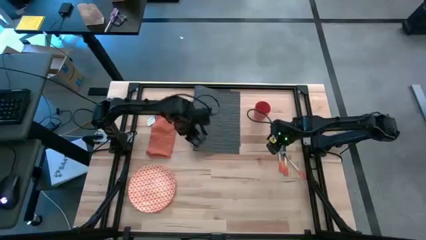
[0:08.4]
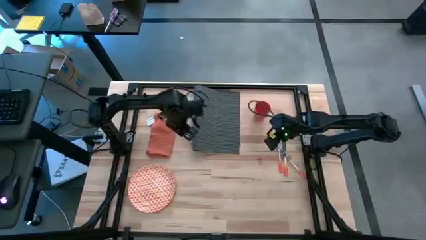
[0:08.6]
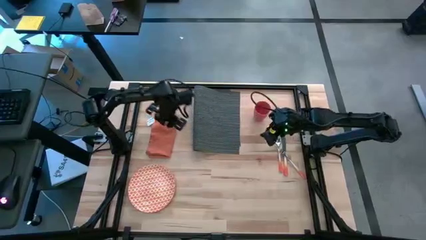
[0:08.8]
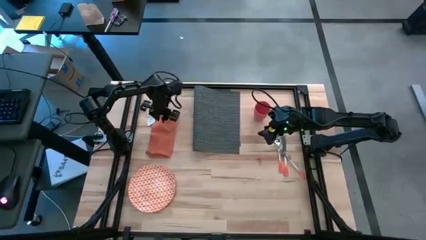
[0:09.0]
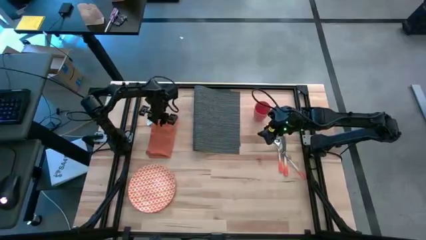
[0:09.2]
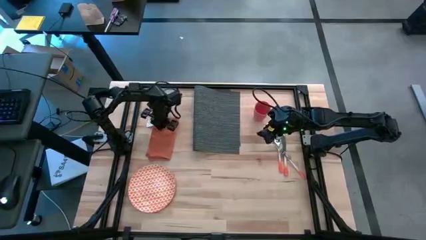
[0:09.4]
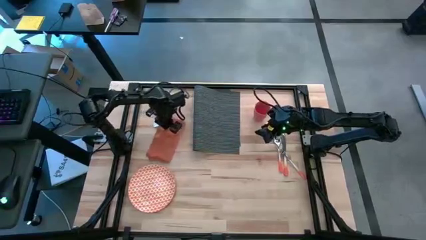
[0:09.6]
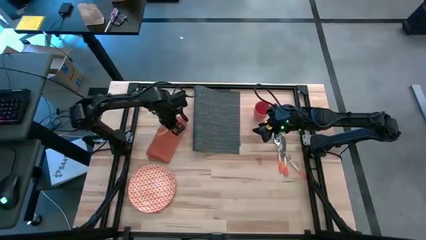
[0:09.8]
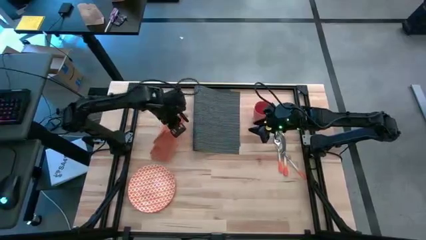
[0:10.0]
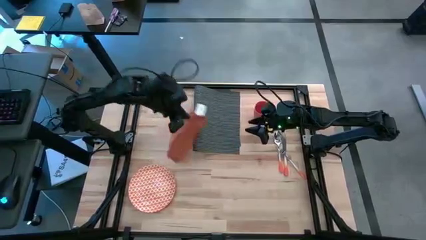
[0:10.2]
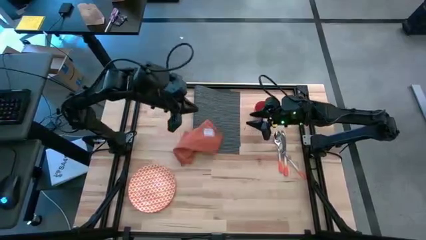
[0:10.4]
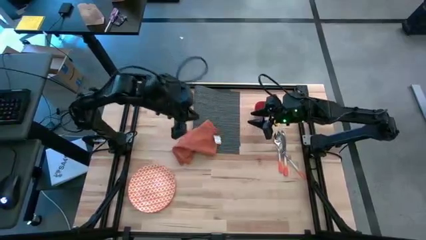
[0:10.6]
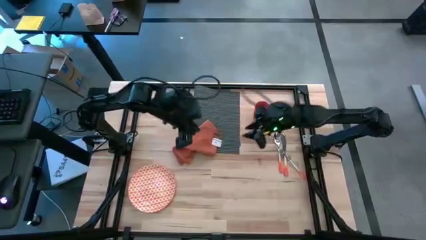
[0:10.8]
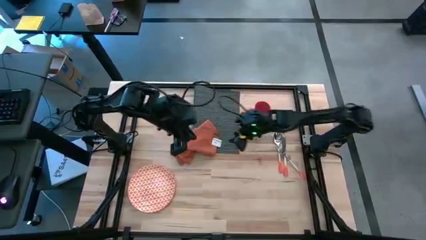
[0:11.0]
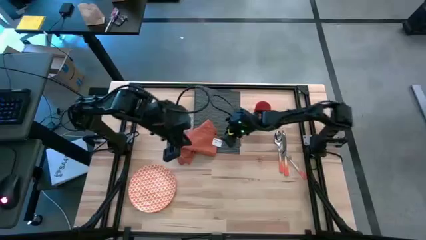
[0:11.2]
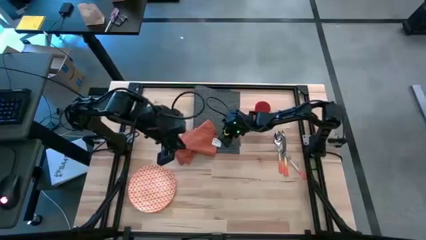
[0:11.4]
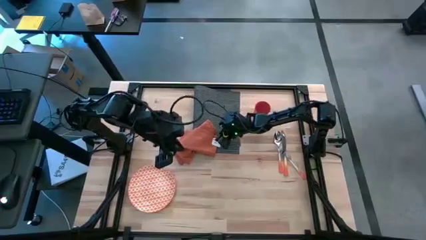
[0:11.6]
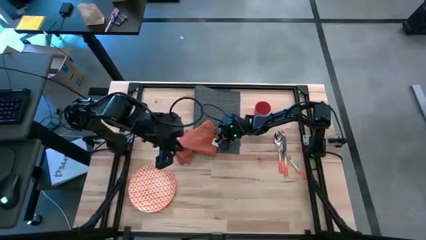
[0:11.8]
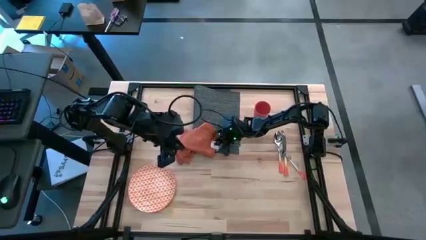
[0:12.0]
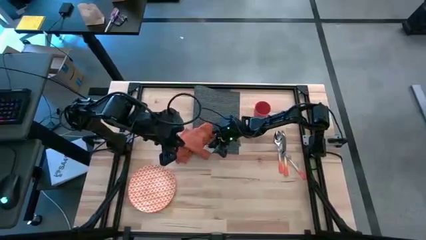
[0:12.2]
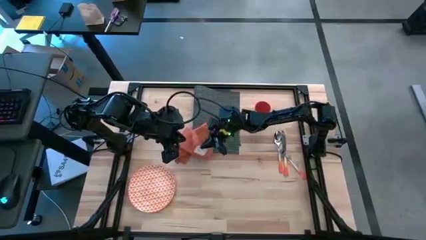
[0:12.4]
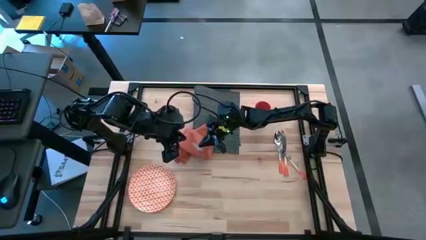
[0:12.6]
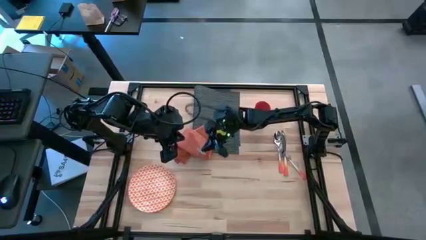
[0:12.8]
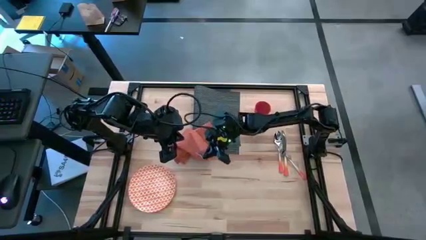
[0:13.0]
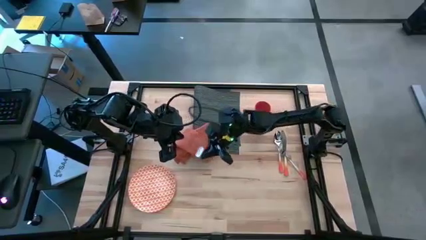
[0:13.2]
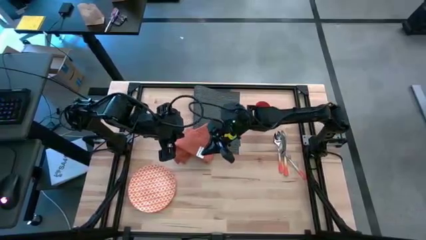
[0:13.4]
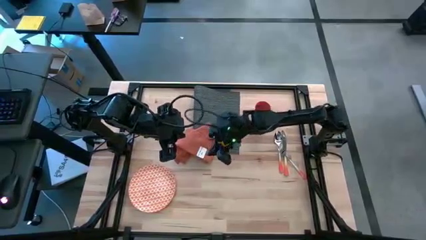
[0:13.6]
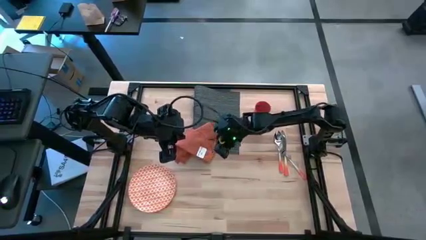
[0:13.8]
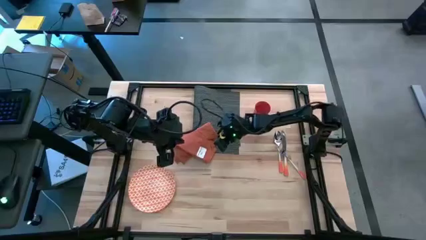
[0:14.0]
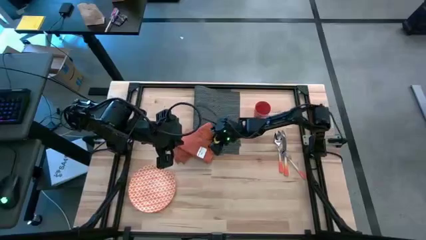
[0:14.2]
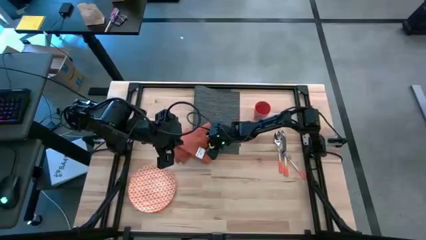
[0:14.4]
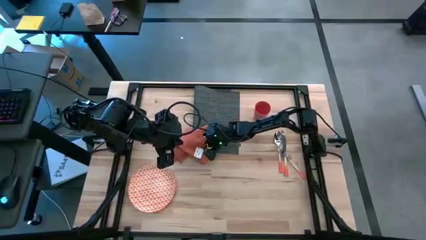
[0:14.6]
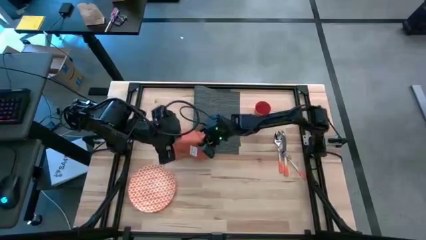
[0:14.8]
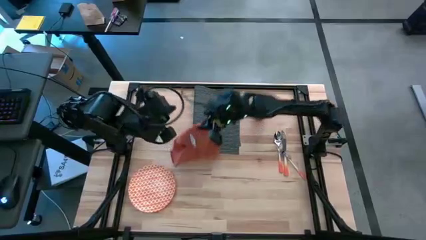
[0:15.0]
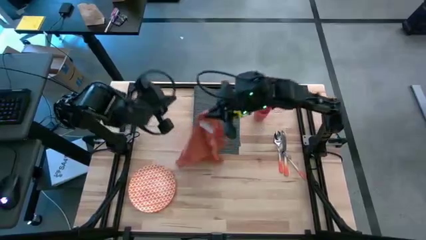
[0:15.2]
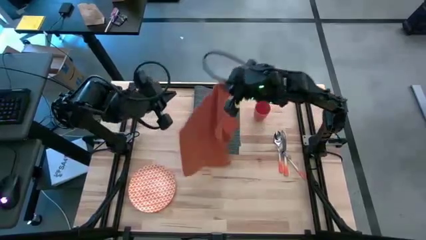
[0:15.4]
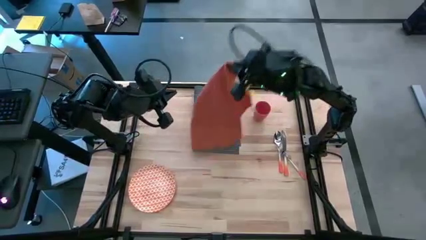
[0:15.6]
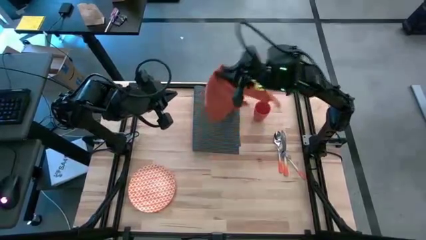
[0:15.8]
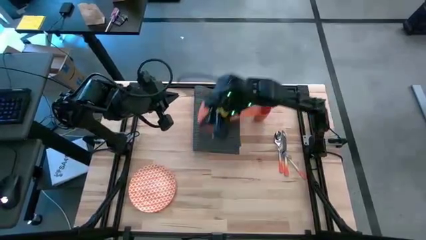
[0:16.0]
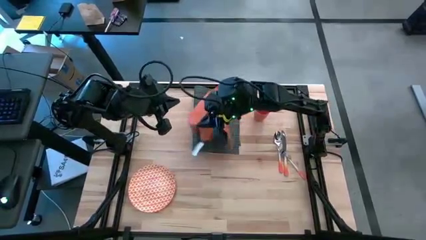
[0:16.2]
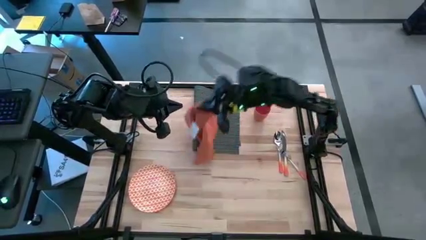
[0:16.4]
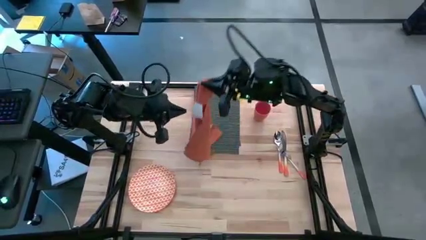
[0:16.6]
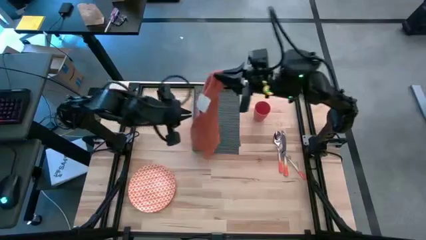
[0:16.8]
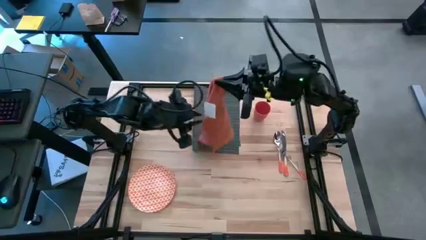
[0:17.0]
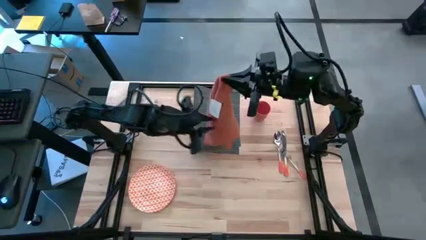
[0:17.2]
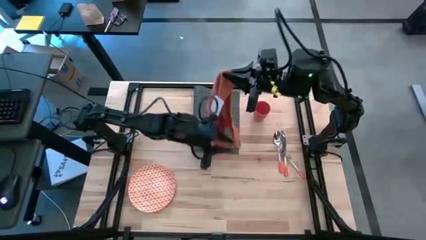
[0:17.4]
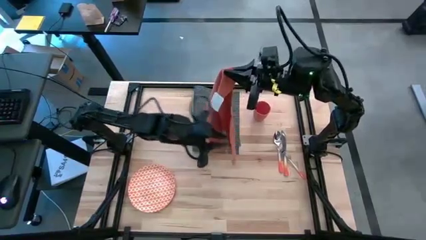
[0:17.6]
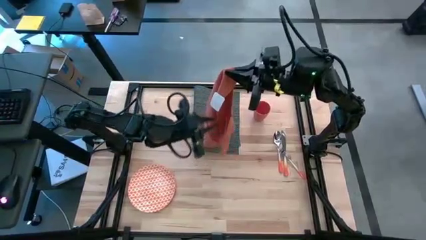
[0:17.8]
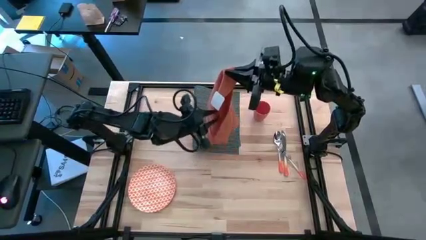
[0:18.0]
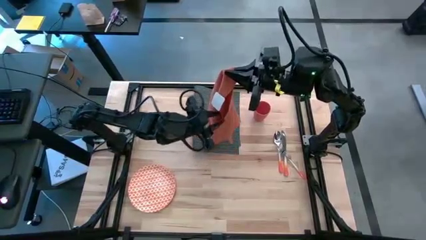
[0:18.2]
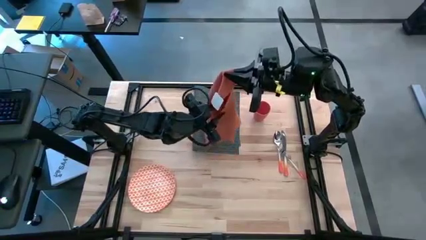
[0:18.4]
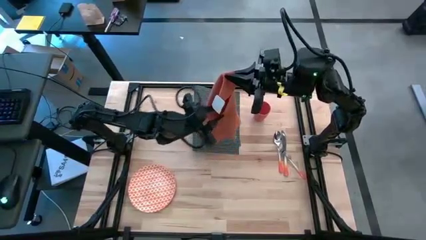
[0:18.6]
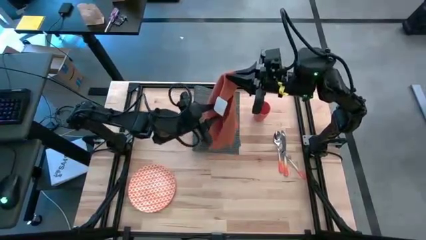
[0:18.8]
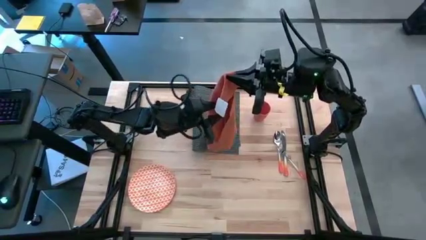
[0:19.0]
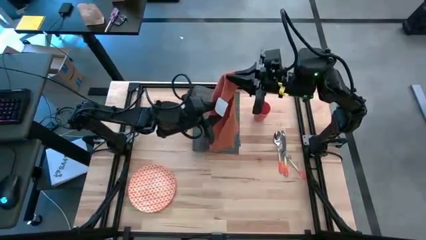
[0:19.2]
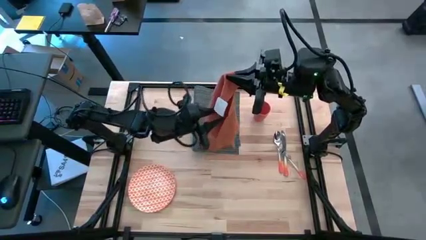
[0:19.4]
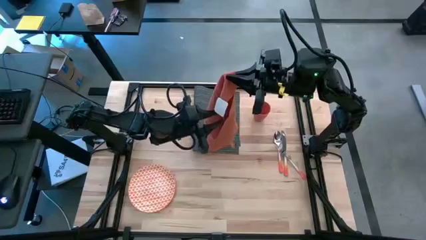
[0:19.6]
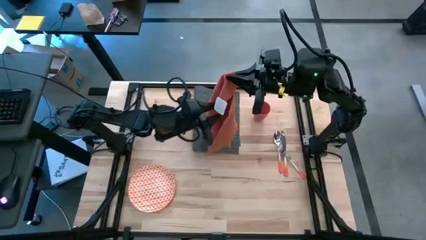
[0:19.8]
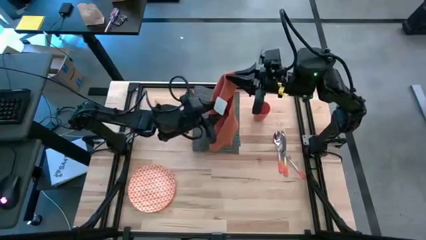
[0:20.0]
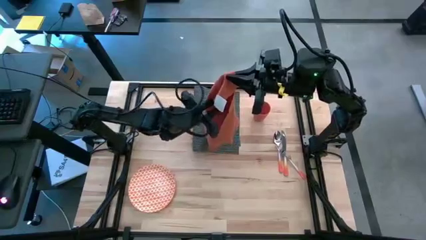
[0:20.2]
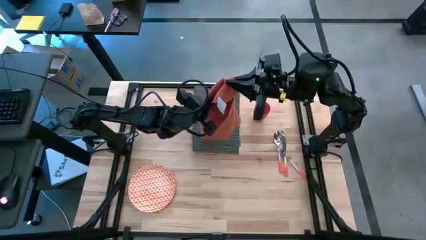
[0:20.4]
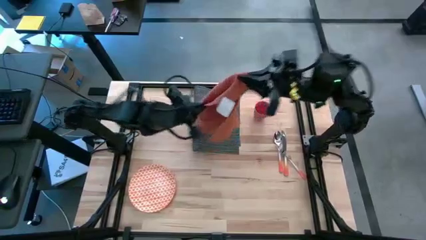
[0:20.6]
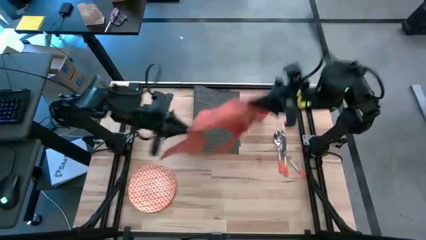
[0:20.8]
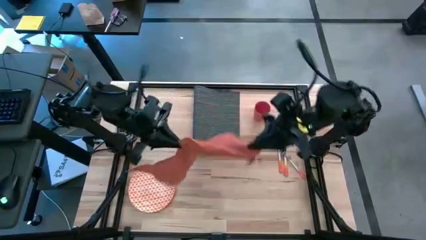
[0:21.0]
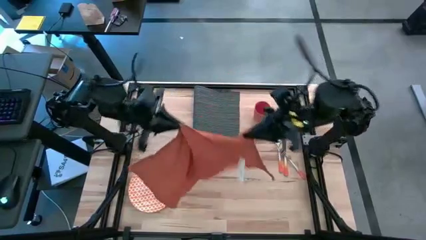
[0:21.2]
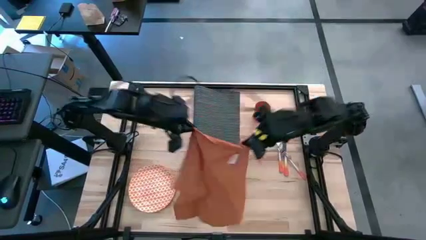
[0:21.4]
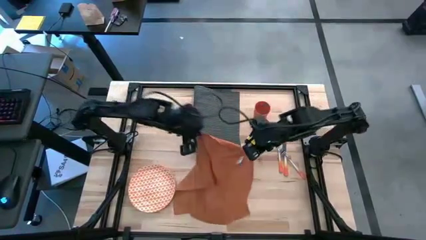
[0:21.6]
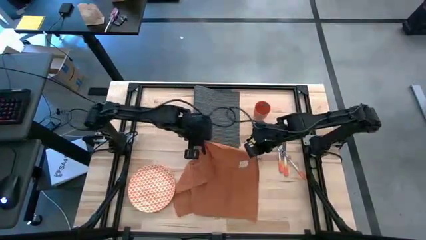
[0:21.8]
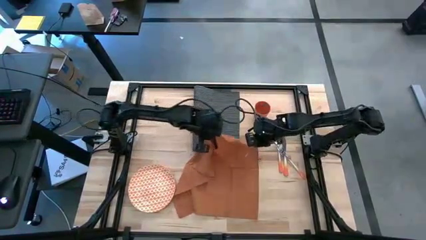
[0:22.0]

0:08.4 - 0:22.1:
Task: Set table place
Fold the orange table napkin
